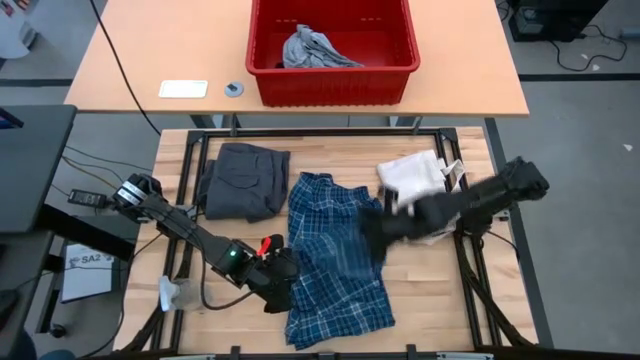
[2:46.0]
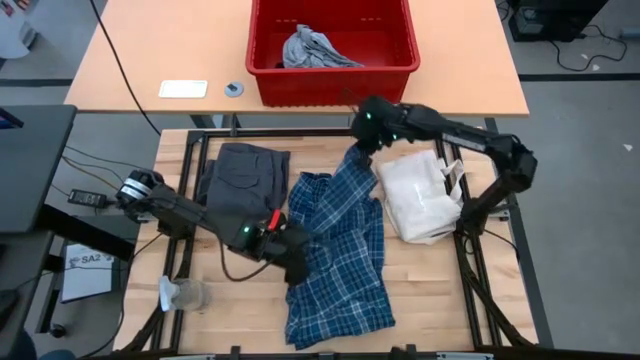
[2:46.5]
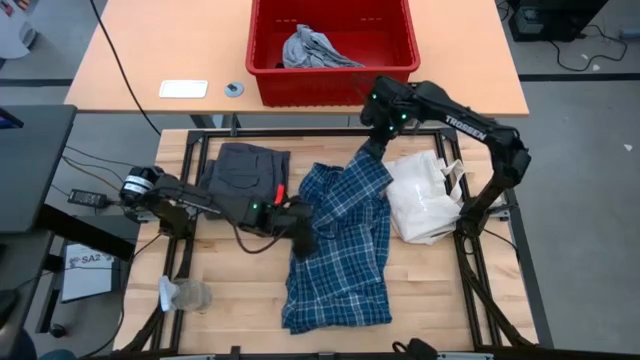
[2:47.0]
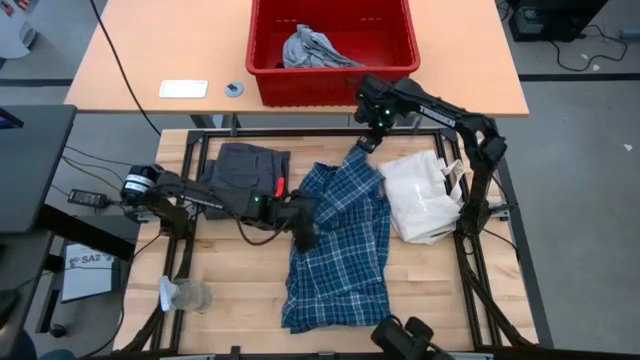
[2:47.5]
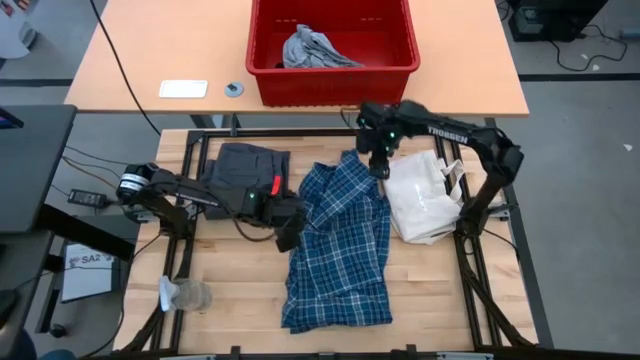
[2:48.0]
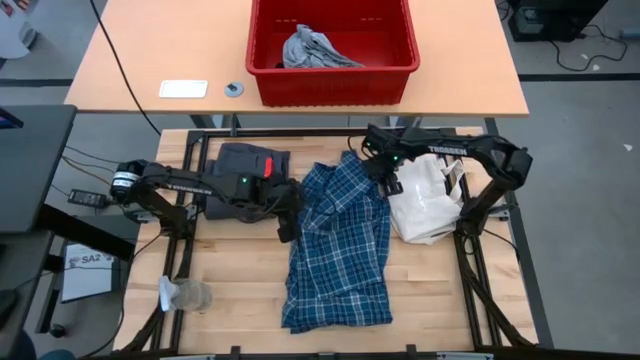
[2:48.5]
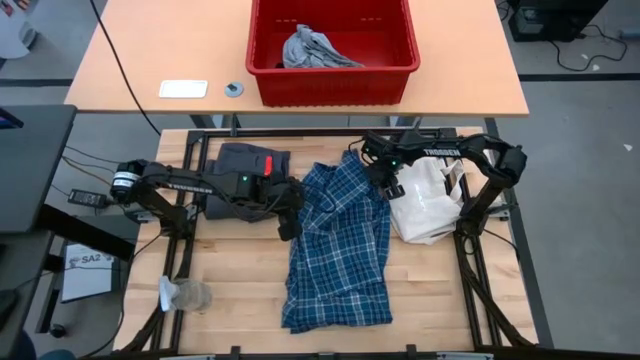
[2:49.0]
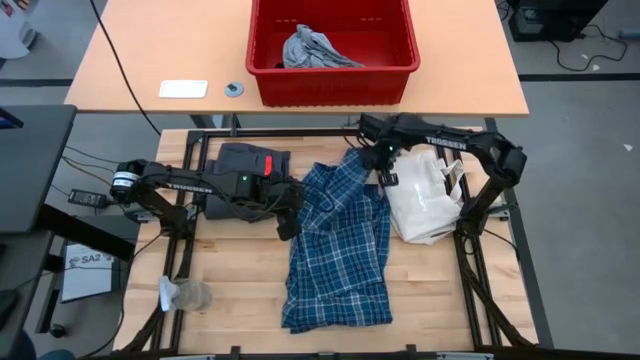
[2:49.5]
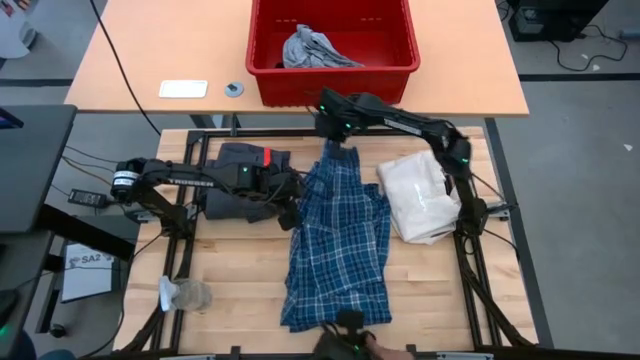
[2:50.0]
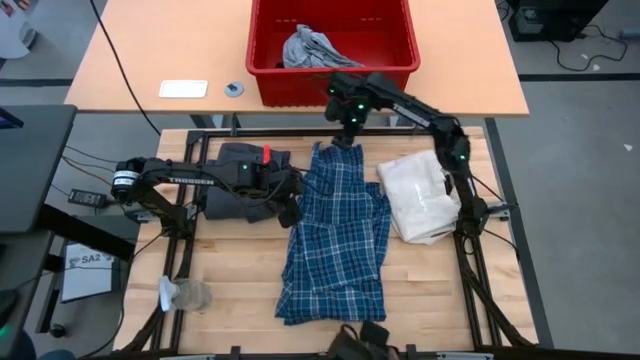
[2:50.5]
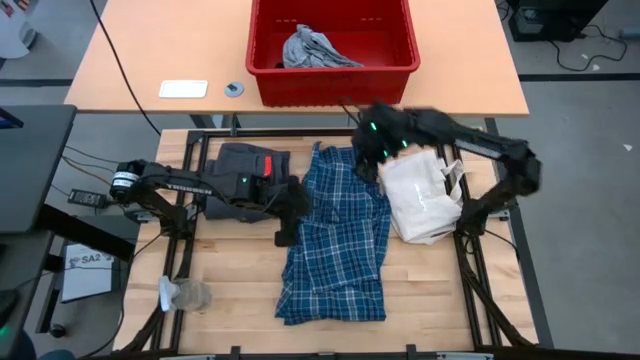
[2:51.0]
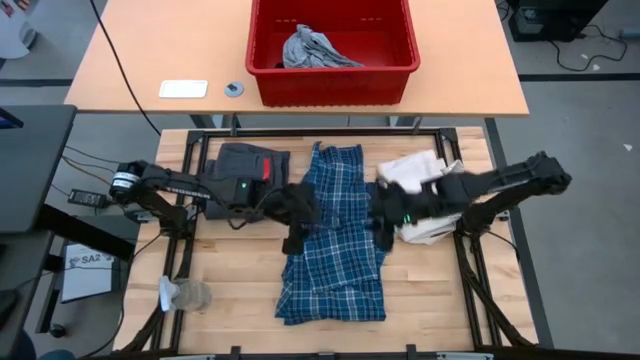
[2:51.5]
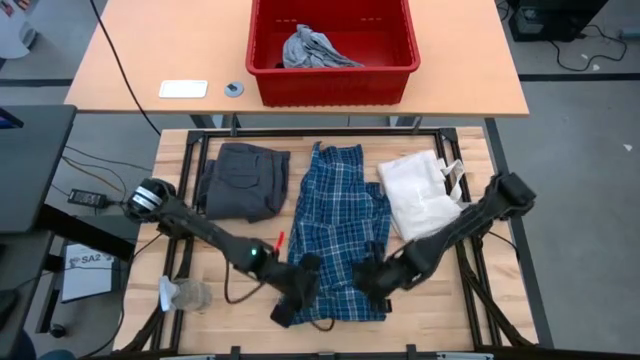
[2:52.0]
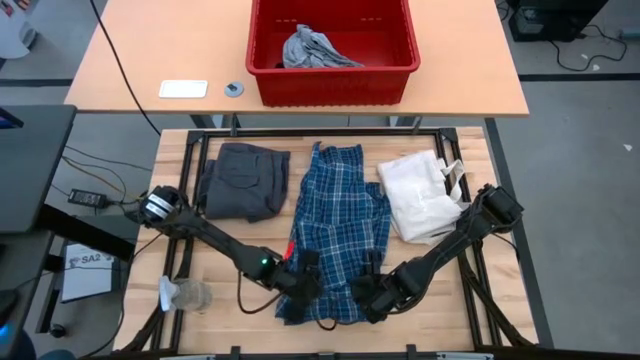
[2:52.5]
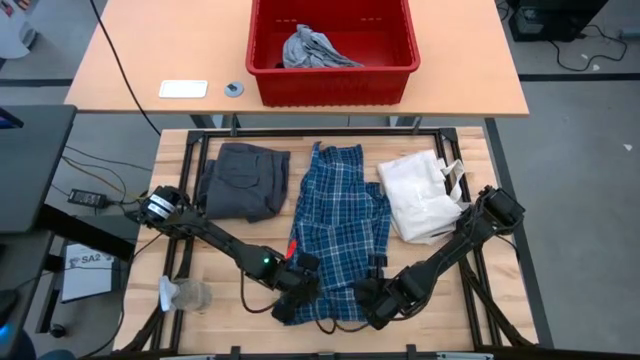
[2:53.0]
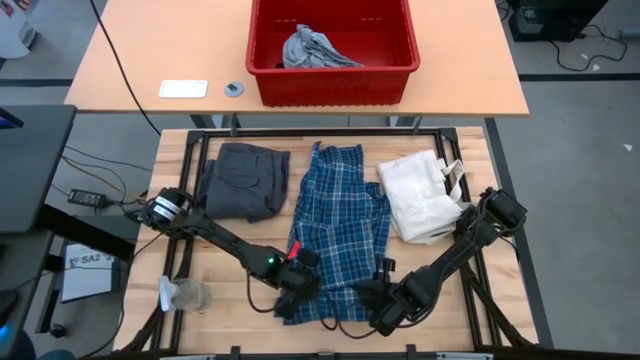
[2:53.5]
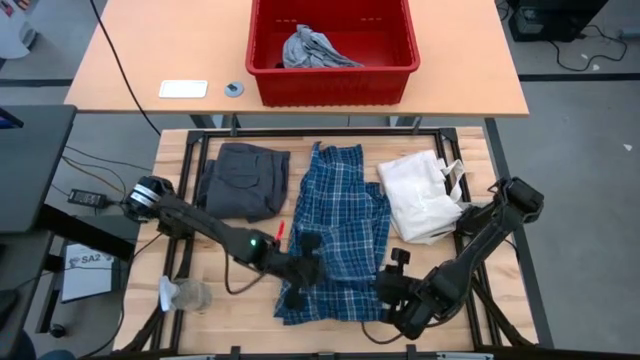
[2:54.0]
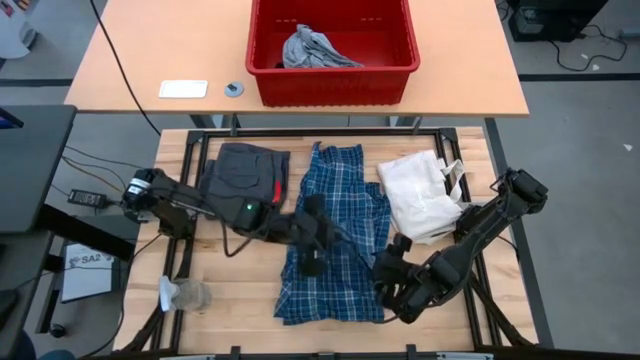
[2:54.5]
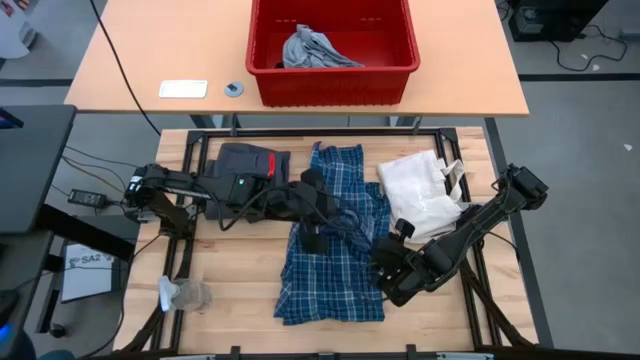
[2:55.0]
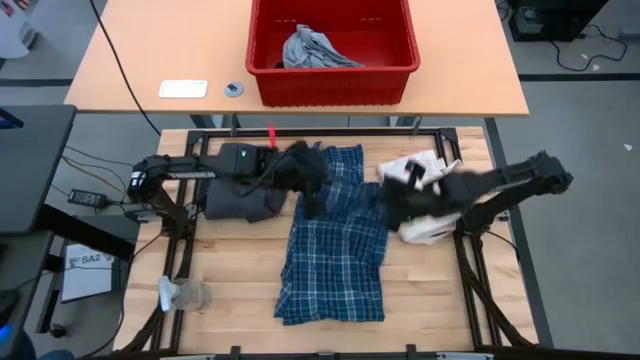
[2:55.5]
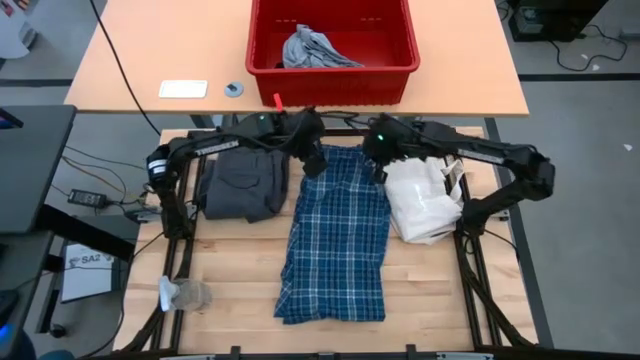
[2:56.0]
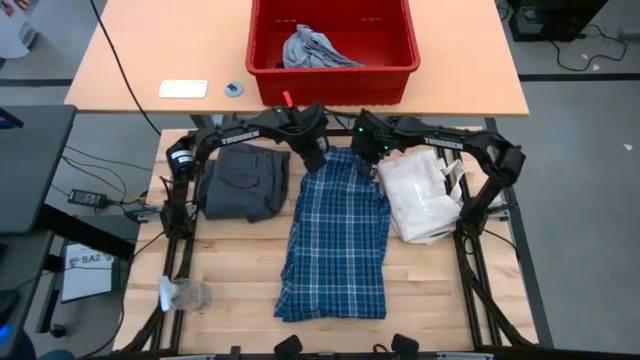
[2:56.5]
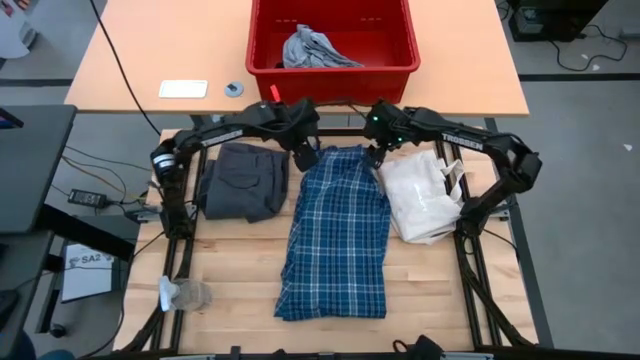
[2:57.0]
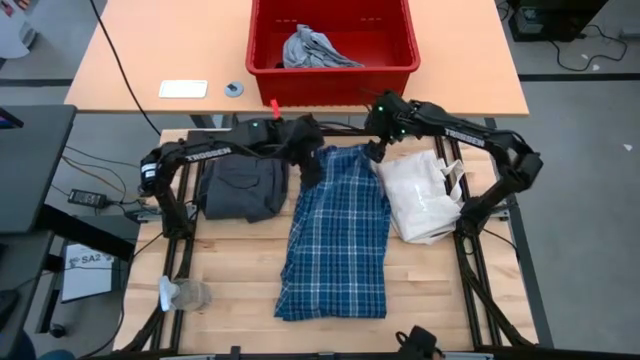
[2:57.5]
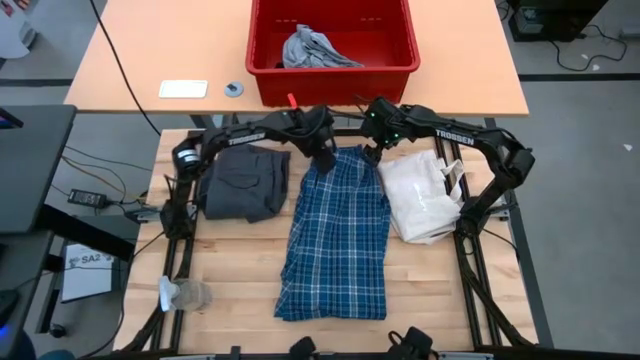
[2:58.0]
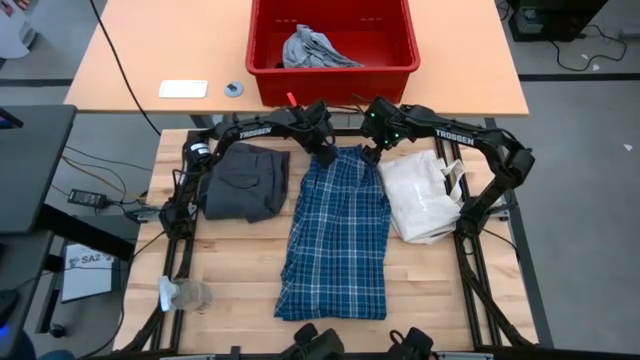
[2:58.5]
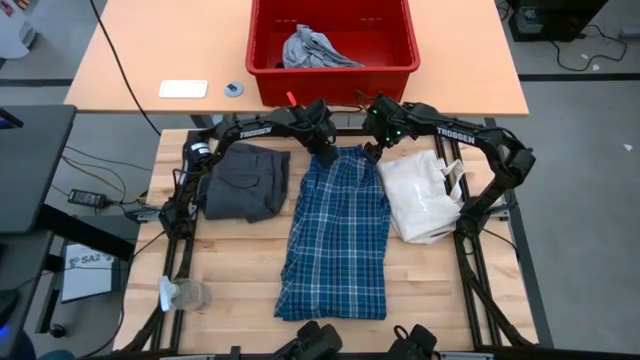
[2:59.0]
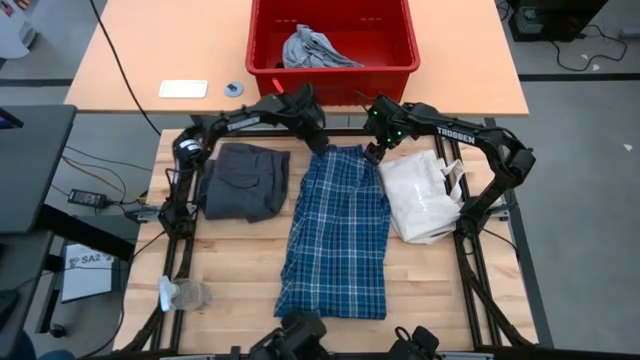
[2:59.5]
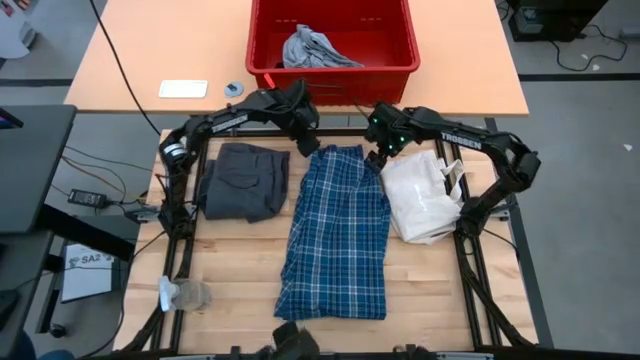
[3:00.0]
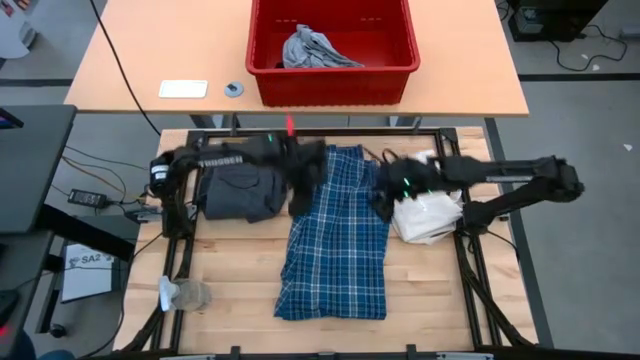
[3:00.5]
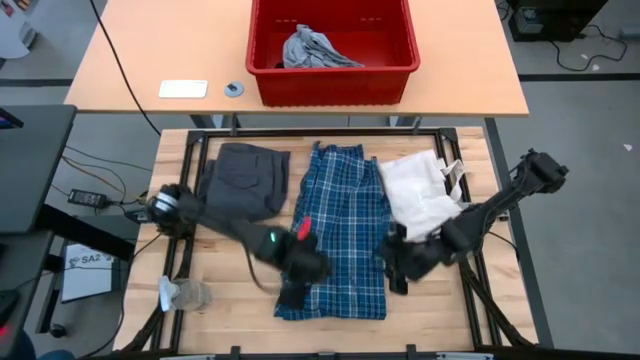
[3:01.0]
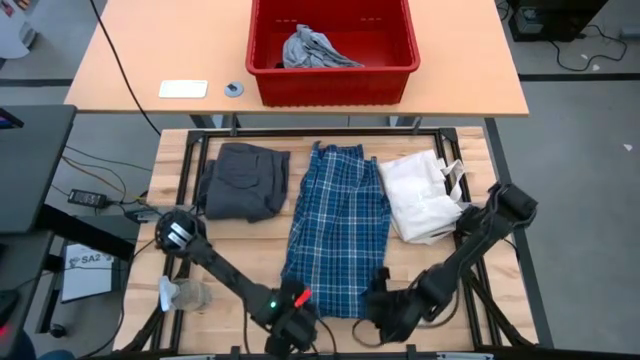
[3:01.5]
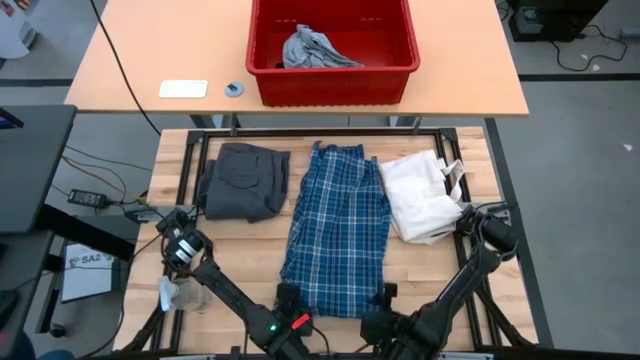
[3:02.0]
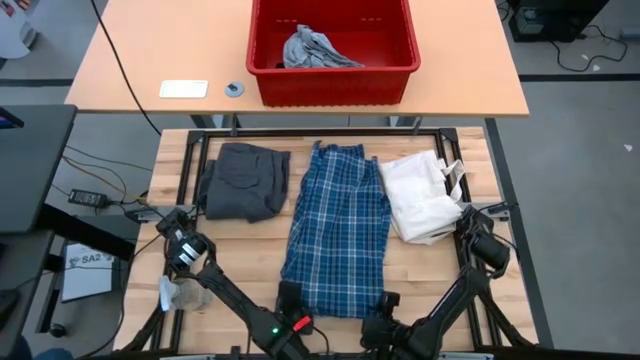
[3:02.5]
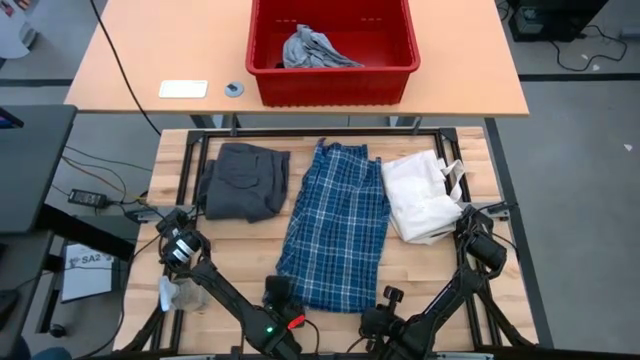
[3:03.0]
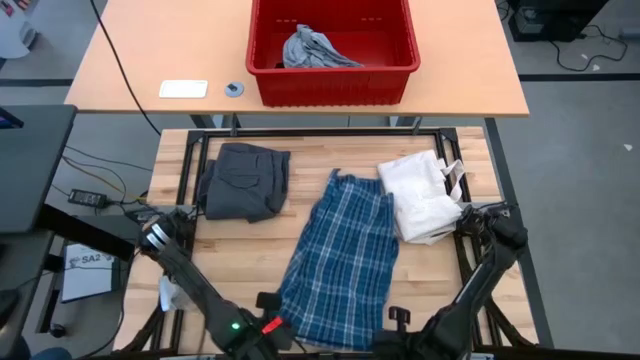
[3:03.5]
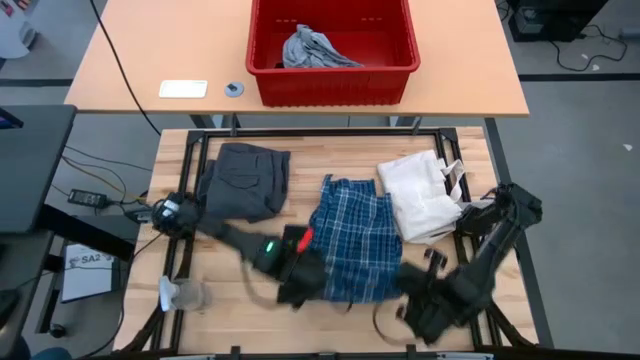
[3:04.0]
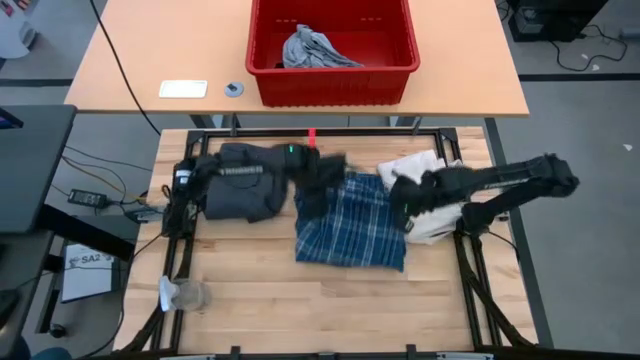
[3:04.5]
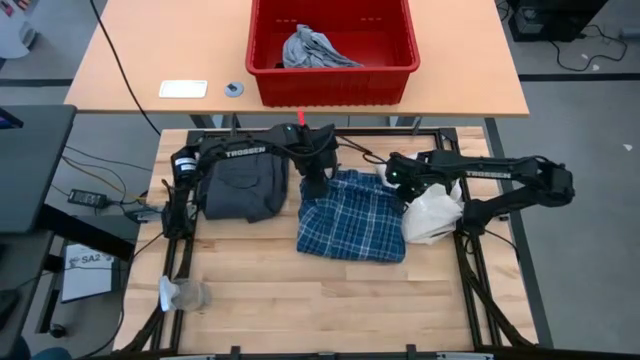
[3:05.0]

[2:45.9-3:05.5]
Task: Fold Laundry from Bin
Fold the plaid pants

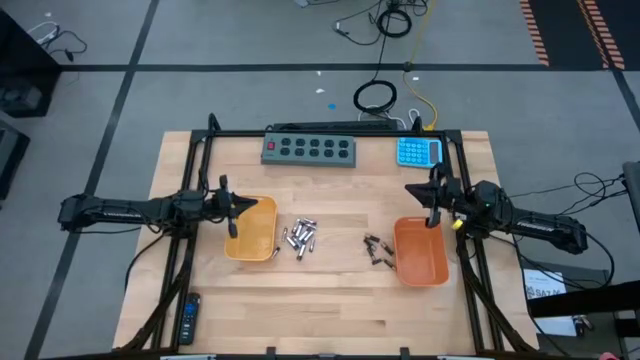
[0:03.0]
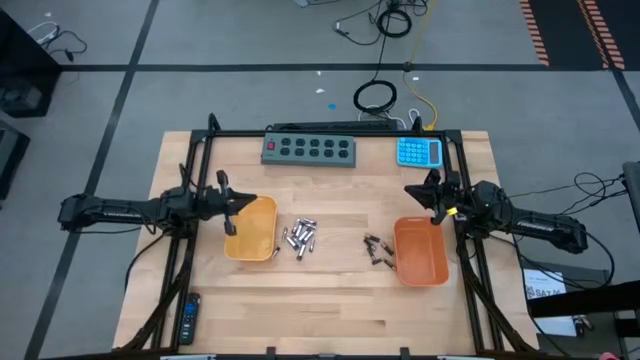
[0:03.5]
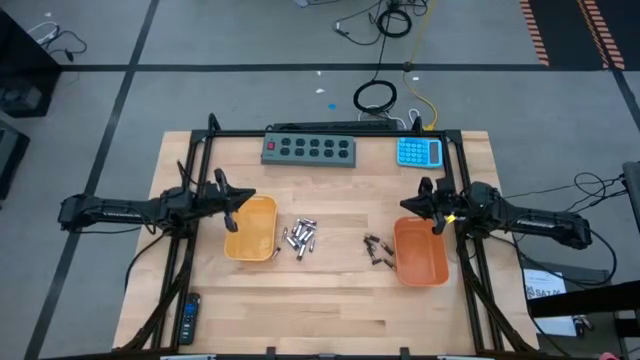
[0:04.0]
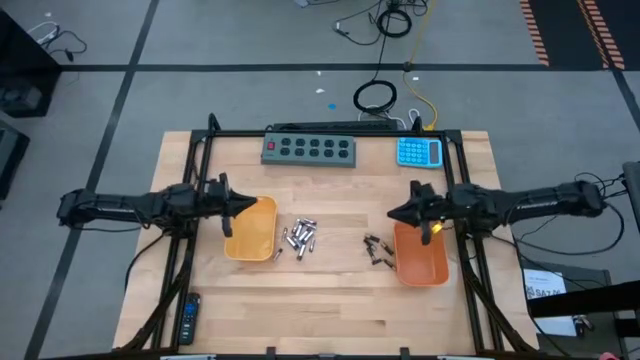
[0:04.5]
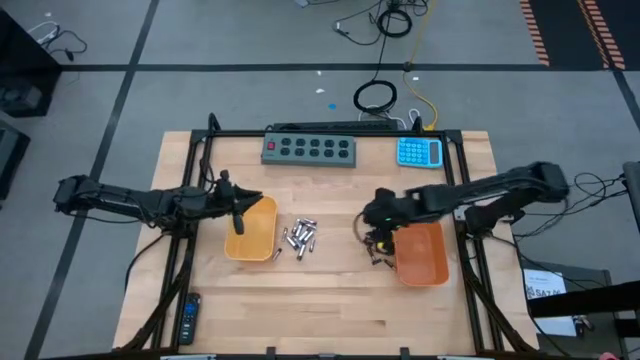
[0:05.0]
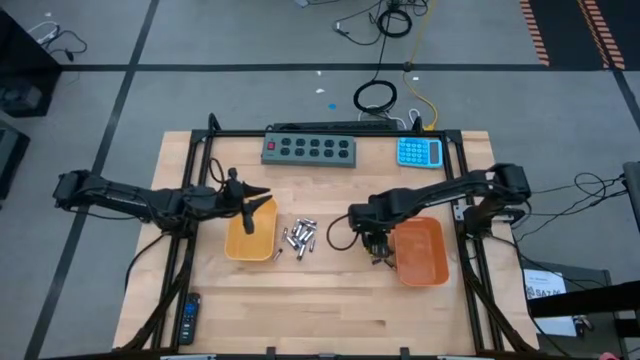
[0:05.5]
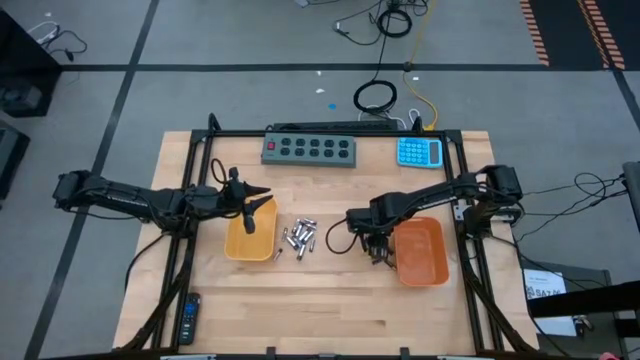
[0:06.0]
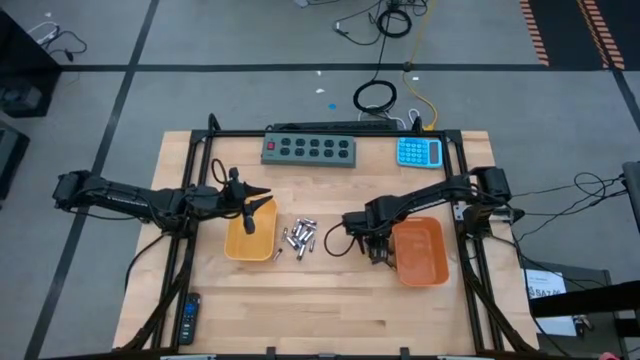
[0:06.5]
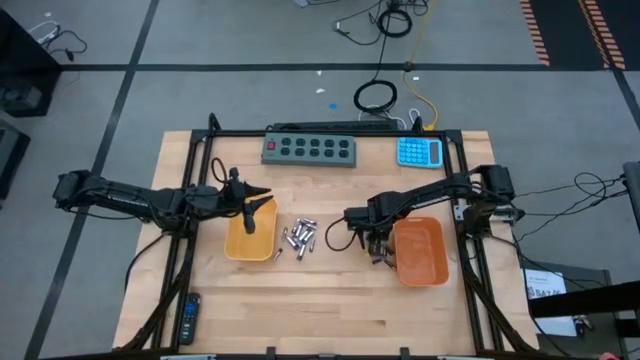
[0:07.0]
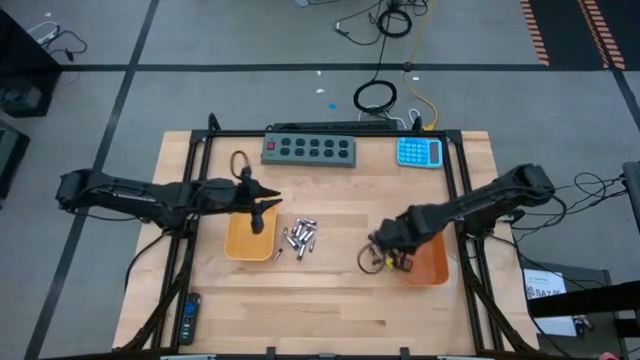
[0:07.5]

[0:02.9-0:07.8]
Task: Sort batteries
Put the black battery into the orange bin
